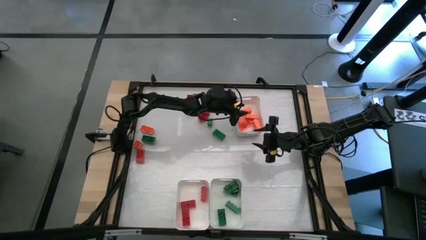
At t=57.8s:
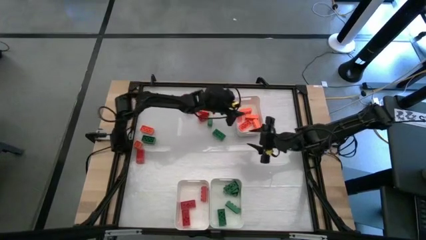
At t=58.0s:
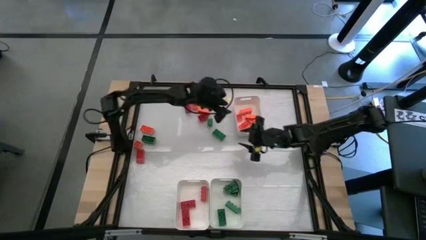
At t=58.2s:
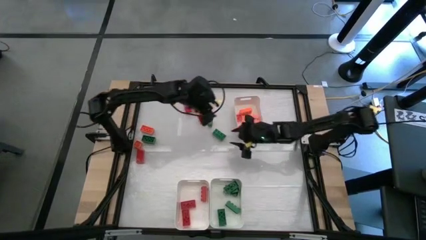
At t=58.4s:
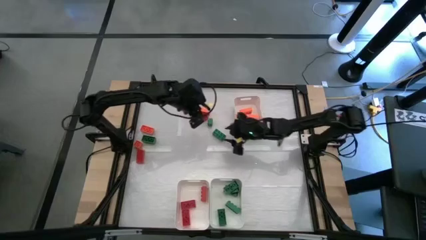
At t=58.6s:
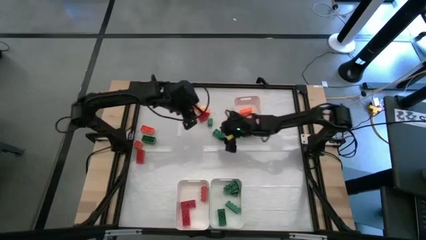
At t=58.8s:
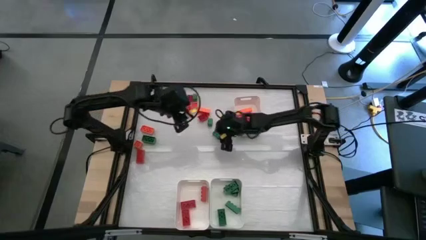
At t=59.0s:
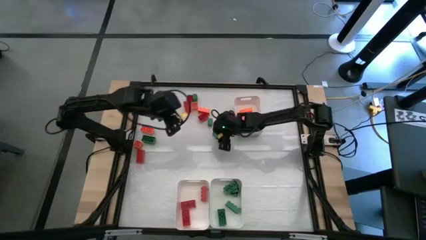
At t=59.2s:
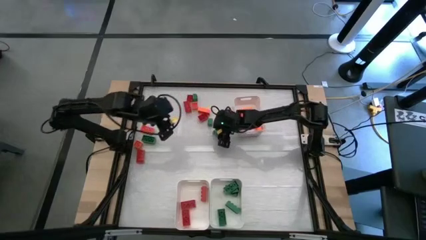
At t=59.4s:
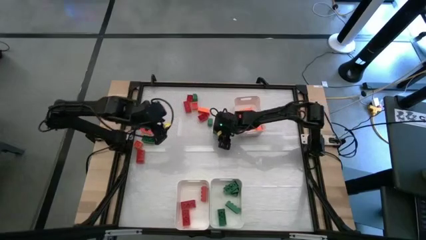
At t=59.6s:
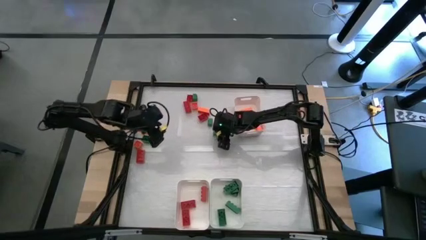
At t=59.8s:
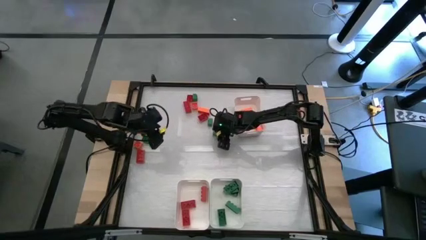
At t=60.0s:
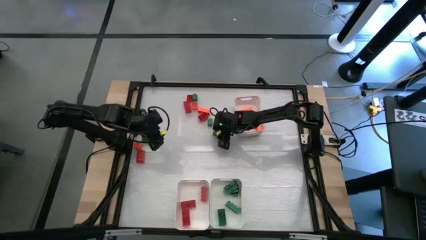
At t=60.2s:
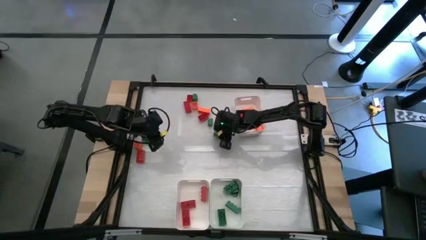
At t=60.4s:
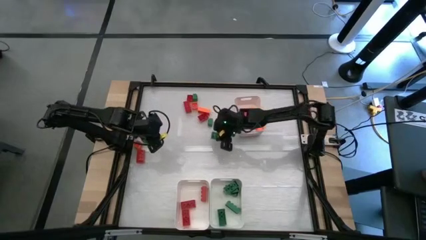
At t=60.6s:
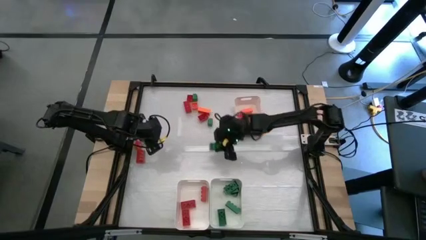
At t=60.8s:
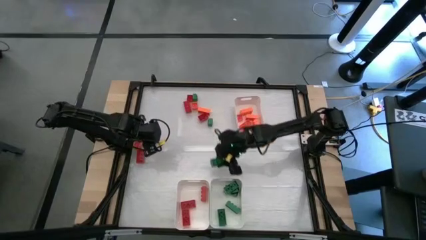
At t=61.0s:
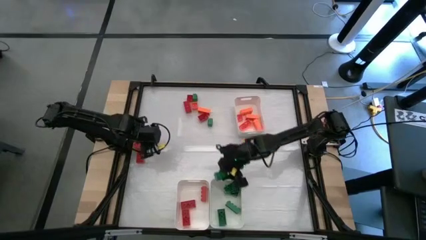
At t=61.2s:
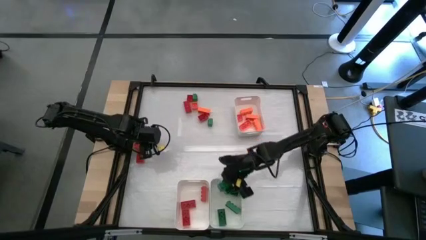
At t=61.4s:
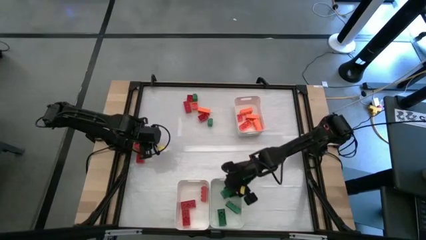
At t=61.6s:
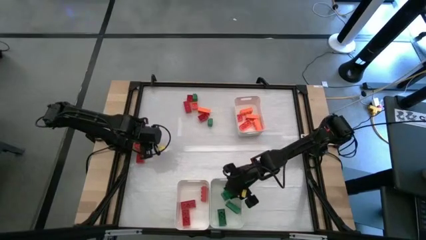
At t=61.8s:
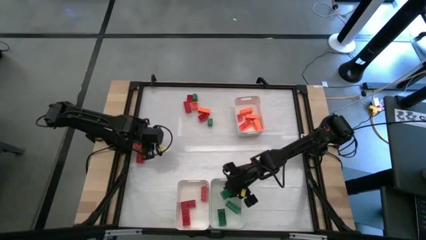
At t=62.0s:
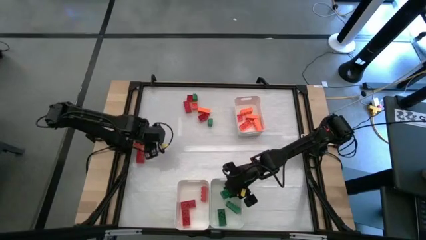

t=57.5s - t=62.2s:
Task: Sort blocks
Put the green game piece into the bottom right white bin

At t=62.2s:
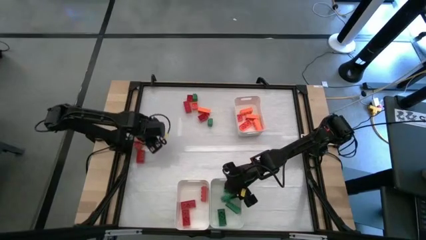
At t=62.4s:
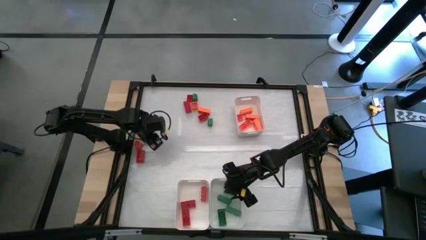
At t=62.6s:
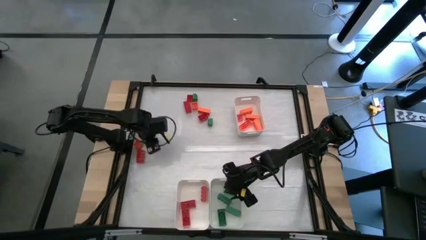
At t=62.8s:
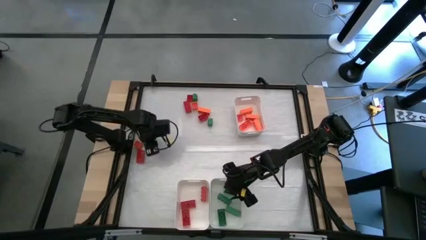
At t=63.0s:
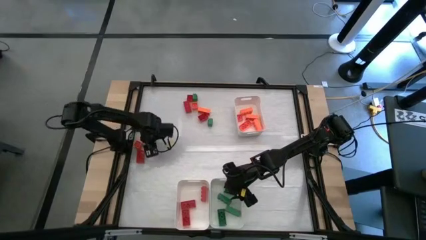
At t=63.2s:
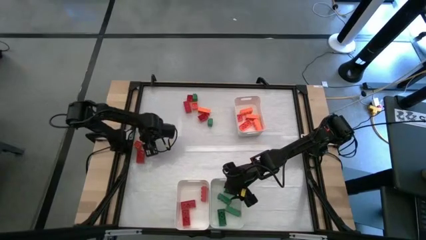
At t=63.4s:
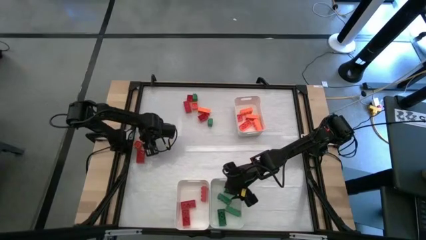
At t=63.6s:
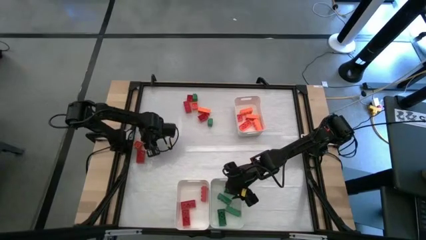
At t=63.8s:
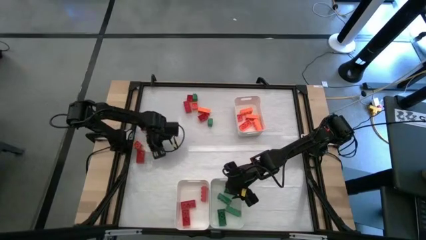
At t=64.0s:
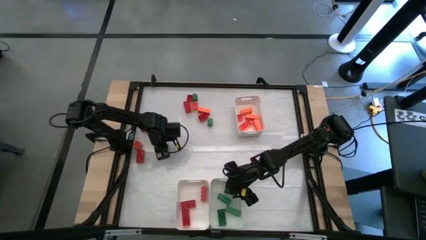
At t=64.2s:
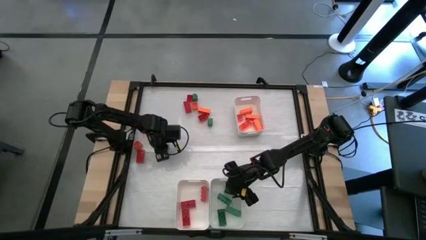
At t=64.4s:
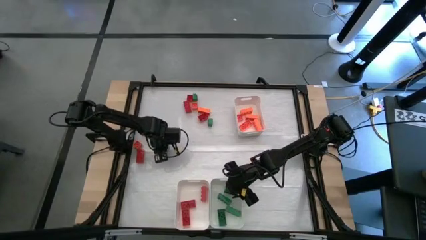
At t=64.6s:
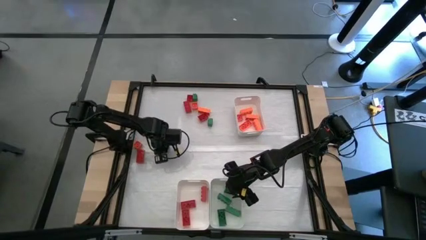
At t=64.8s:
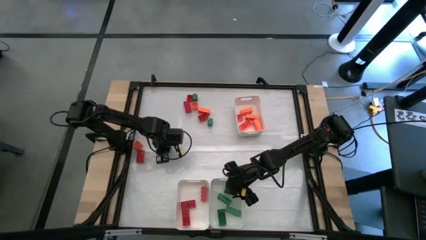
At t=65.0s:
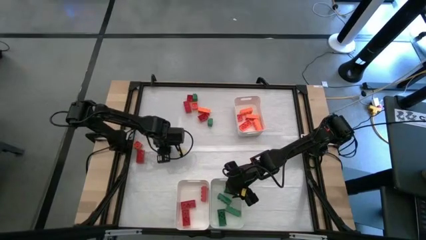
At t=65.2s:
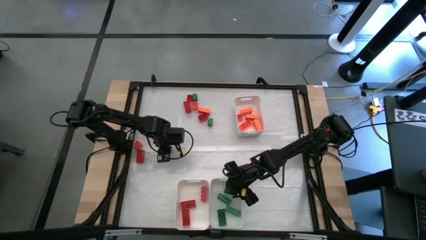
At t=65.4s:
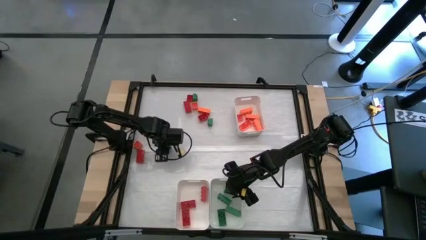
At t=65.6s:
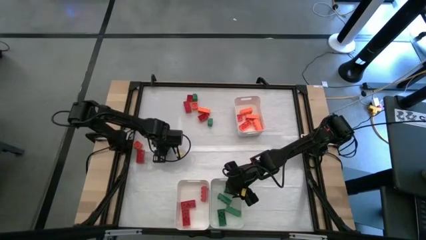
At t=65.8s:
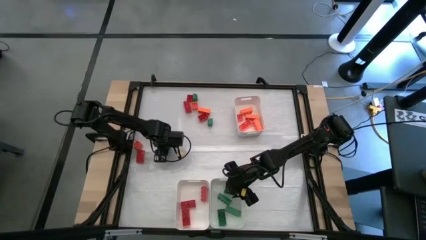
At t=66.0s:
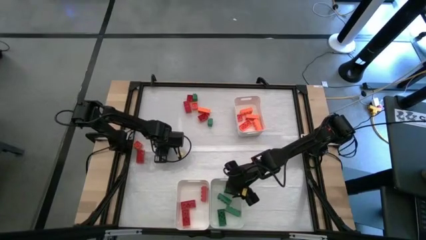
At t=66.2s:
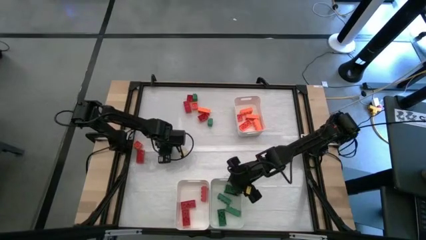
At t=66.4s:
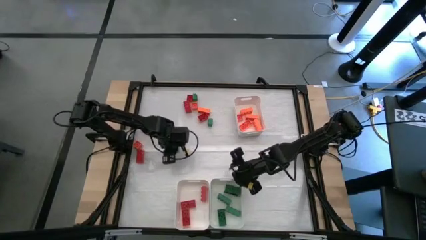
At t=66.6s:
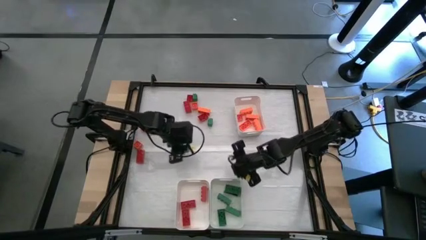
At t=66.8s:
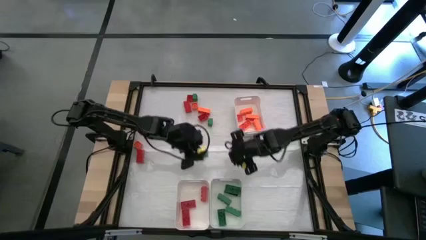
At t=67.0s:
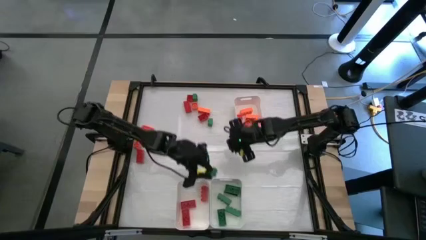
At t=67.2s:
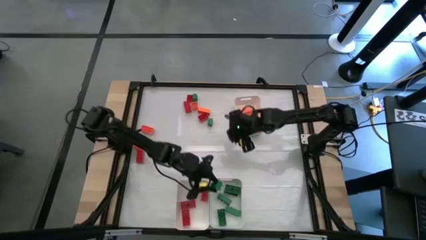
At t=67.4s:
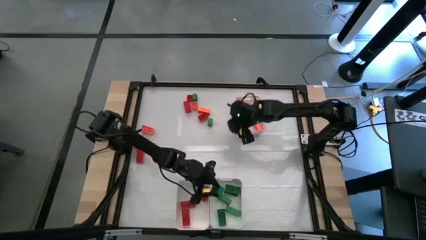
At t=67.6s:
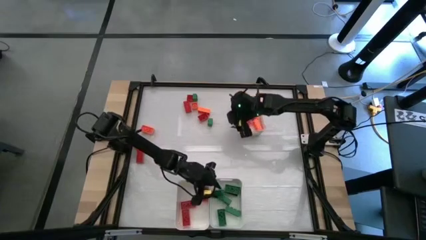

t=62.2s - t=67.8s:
Put the green game piece into the bottom right white bin

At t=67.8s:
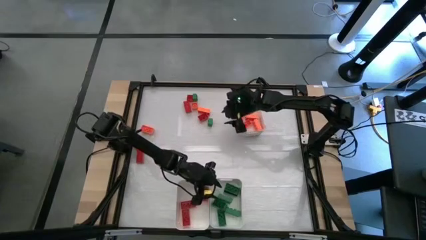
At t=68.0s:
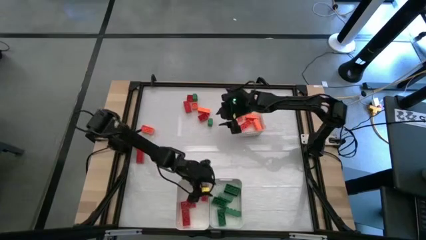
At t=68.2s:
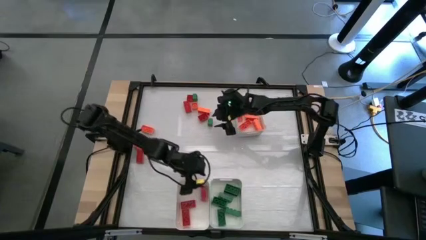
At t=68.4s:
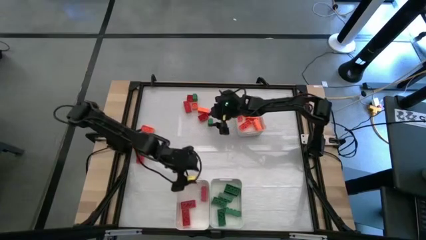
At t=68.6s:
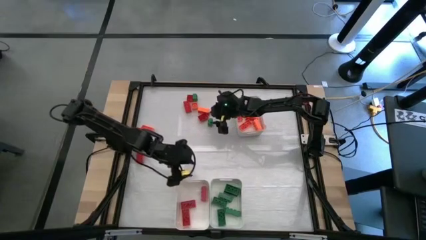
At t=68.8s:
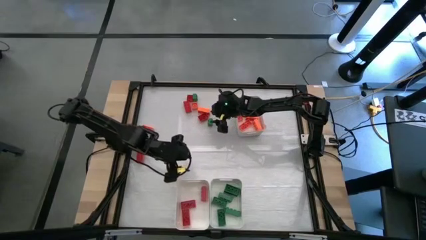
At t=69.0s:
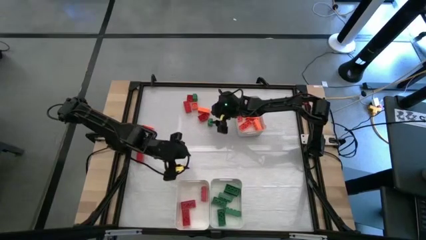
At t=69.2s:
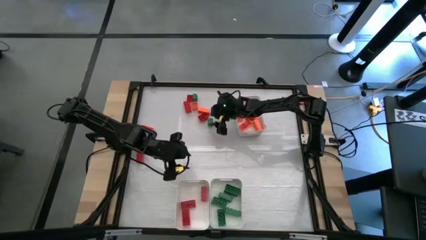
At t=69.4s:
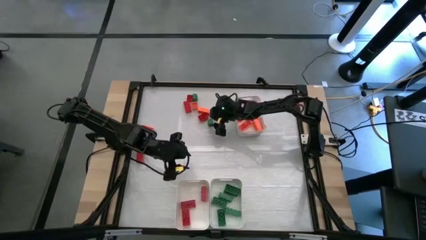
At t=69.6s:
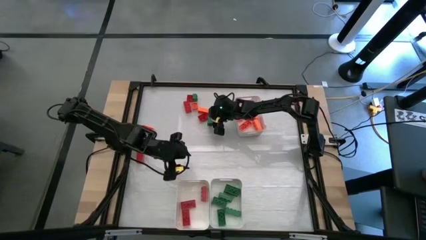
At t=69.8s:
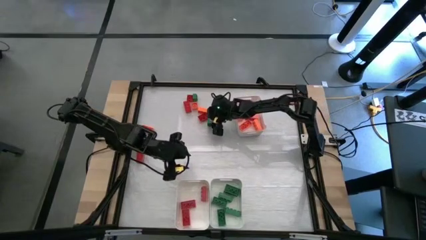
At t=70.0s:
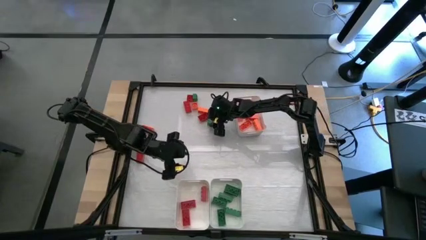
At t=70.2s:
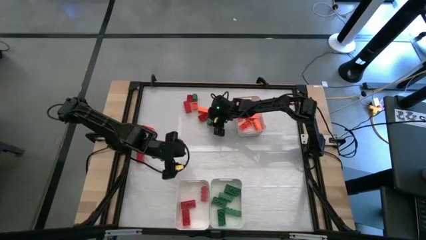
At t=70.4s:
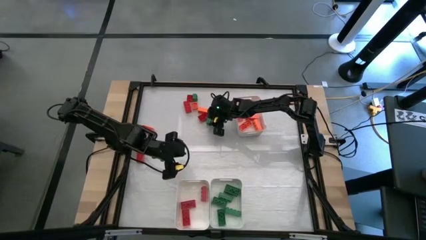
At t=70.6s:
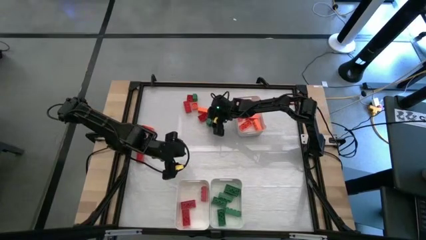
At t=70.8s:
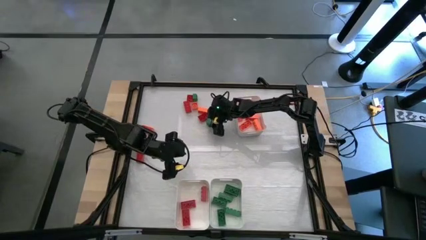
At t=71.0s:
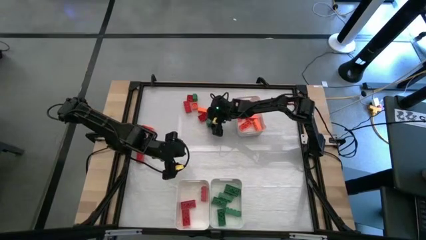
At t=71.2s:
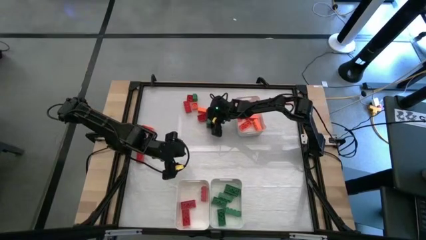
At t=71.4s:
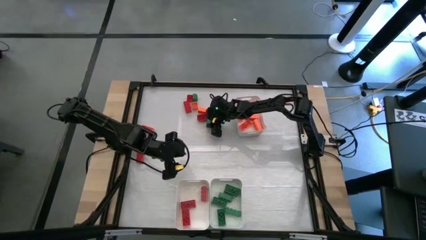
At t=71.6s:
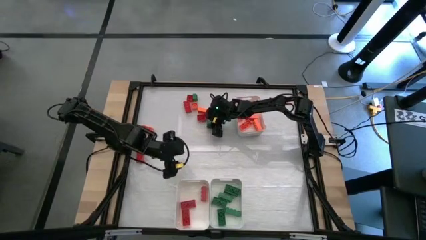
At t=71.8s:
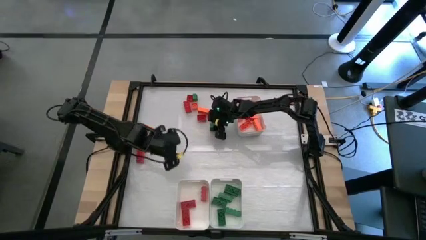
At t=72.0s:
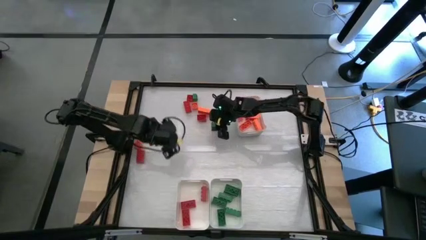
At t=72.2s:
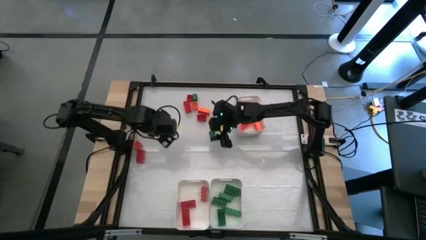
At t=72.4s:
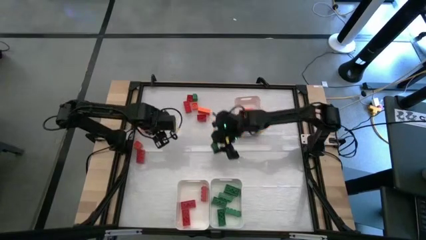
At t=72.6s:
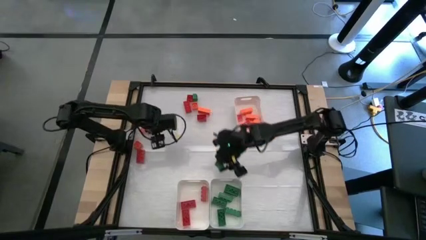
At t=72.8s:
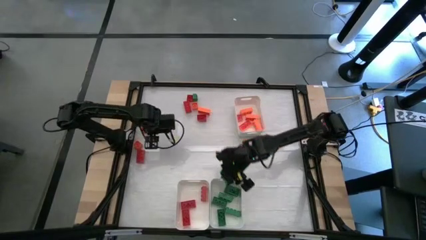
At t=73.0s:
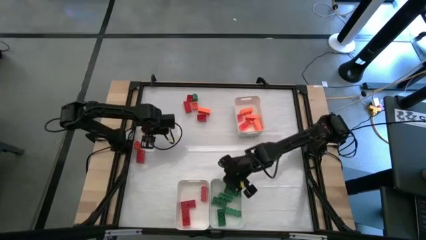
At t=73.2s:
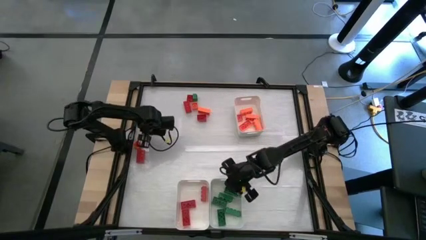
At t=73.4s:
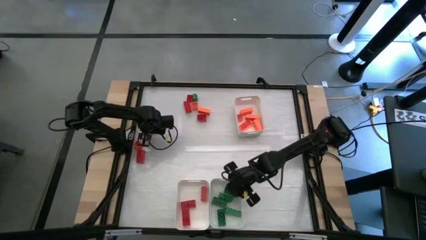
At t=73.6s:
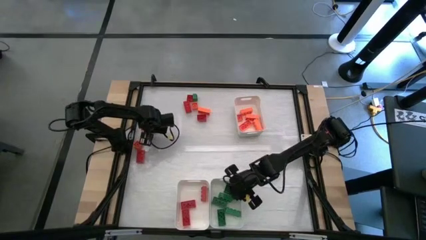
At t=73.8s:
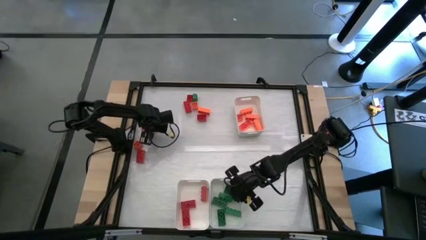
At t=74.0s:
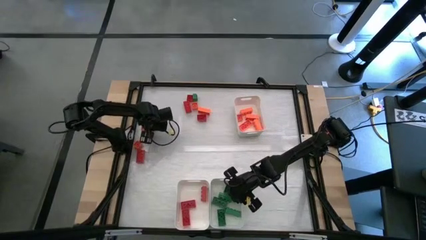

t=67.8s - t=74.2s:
Put the green game piece into the bottom right white bin

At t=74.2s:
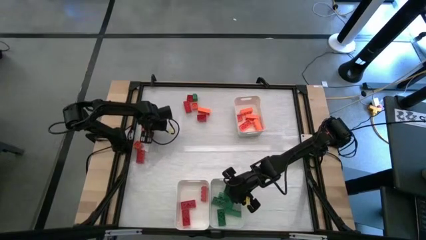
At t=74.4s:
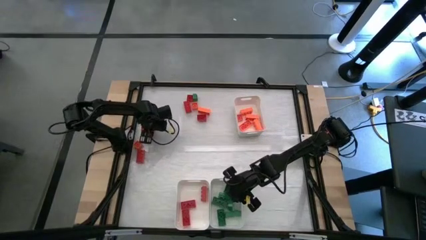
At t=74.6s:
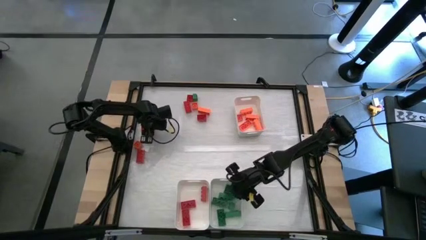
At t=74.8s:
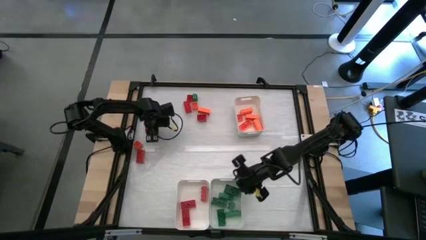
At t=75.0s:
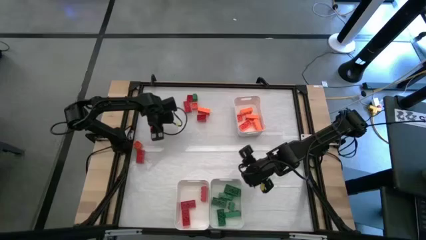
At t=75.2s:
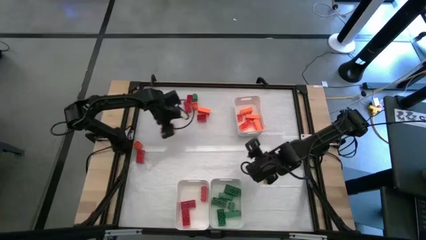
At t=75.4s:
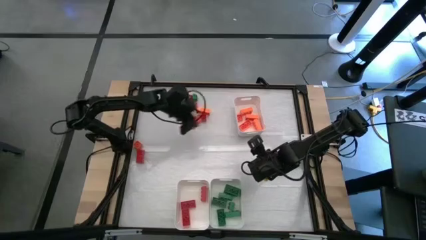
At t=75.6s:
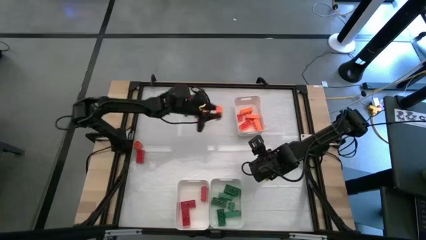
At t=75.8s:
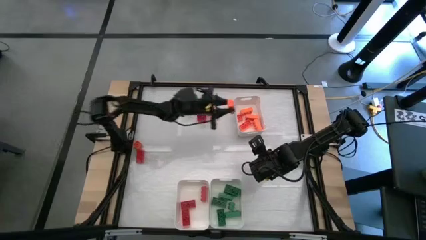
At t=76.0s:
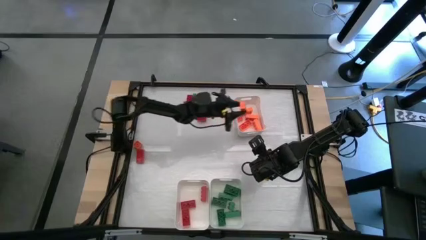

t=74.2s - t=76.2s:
Put the orange game piece into the top right white bin
